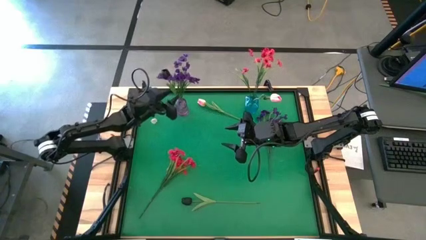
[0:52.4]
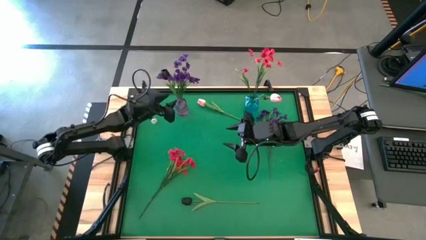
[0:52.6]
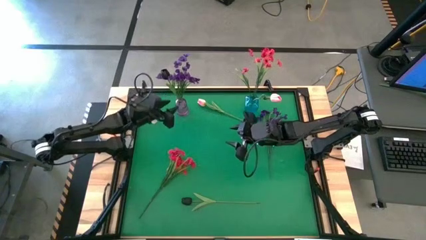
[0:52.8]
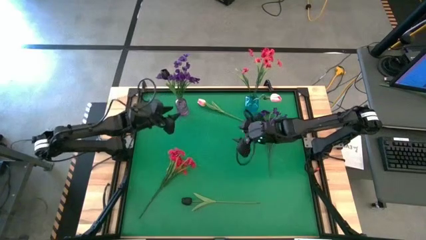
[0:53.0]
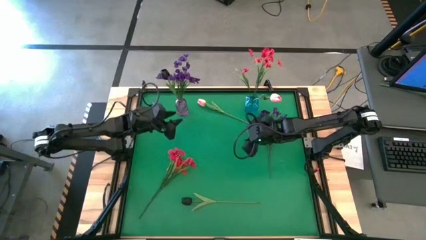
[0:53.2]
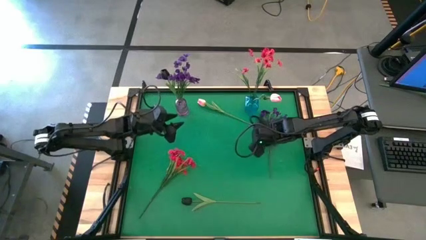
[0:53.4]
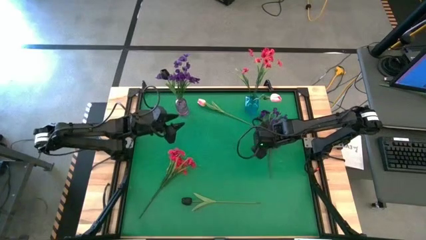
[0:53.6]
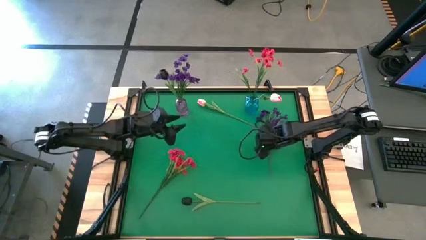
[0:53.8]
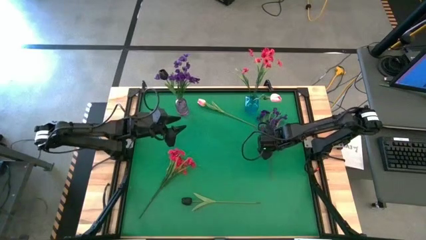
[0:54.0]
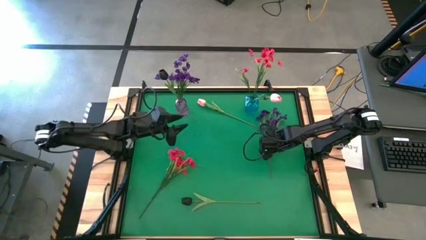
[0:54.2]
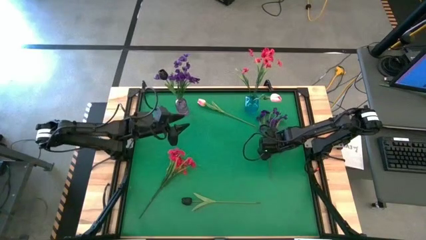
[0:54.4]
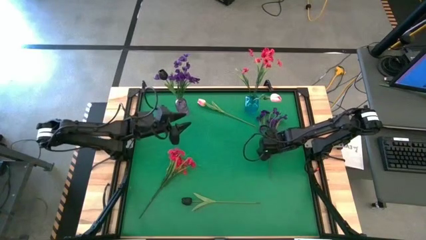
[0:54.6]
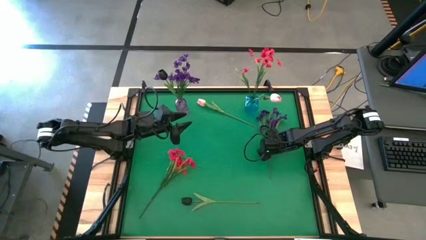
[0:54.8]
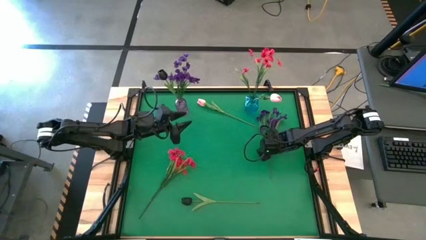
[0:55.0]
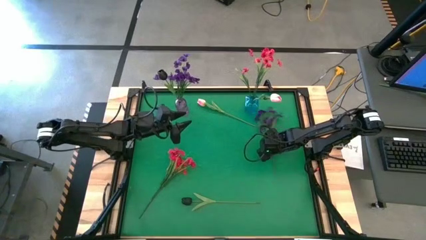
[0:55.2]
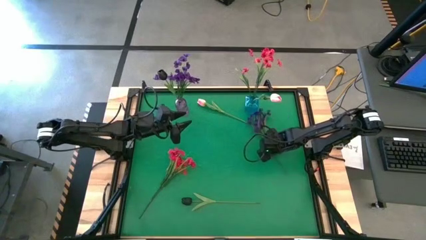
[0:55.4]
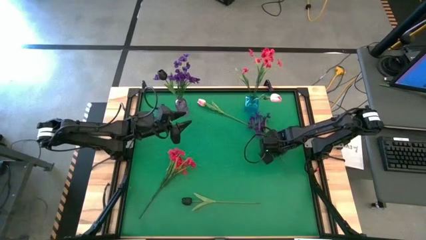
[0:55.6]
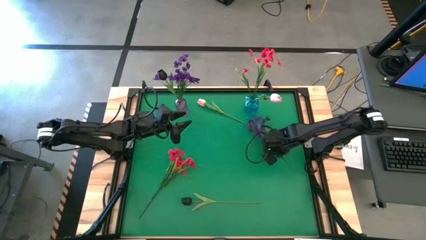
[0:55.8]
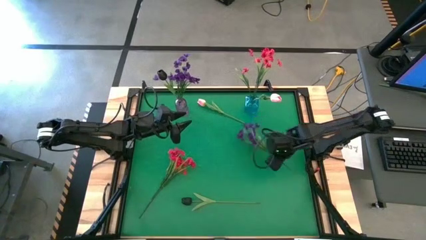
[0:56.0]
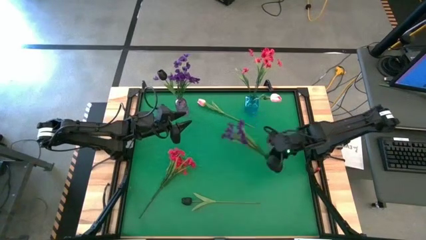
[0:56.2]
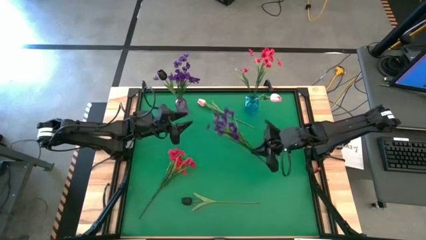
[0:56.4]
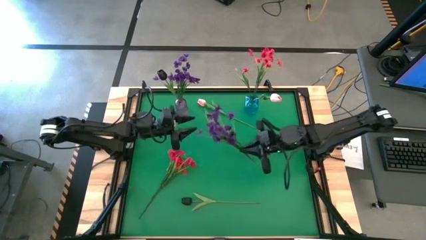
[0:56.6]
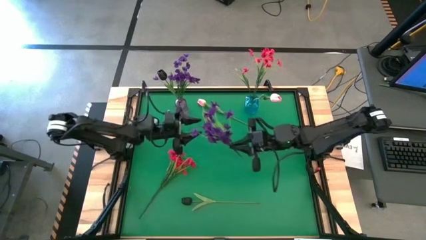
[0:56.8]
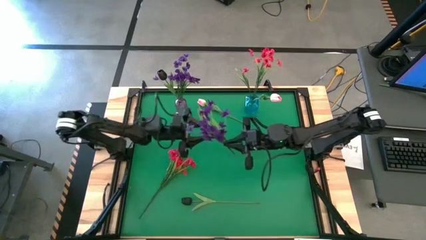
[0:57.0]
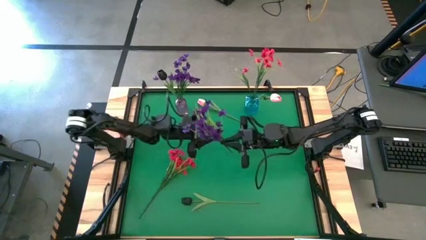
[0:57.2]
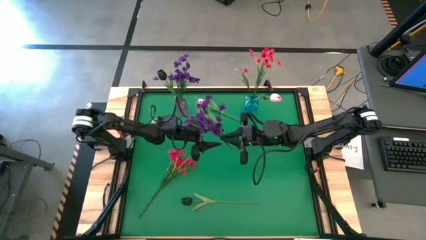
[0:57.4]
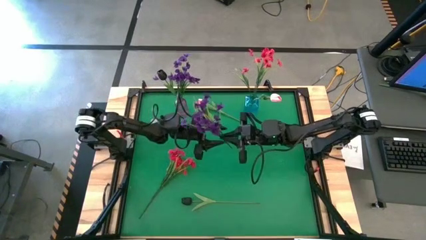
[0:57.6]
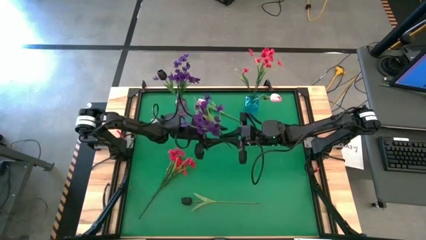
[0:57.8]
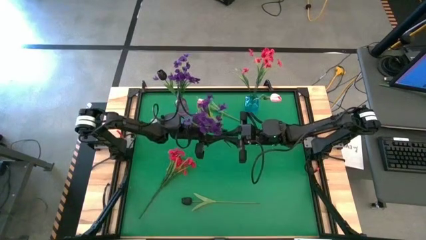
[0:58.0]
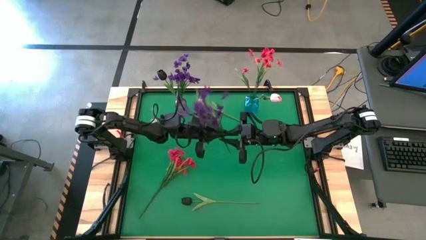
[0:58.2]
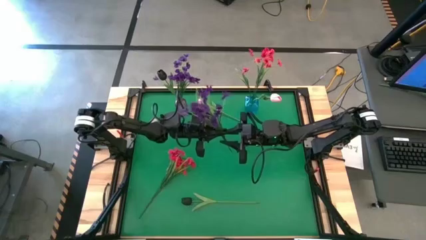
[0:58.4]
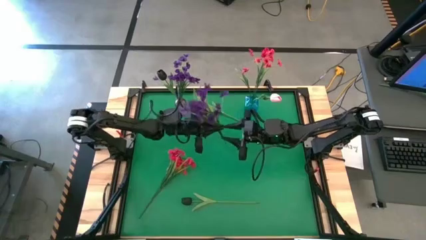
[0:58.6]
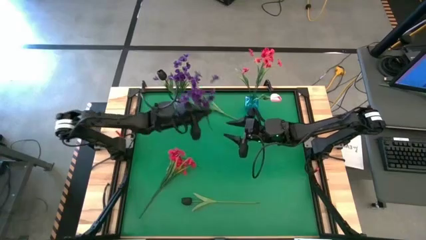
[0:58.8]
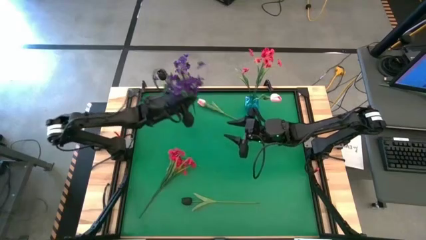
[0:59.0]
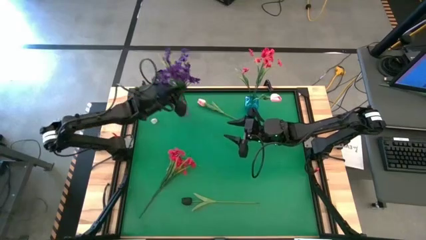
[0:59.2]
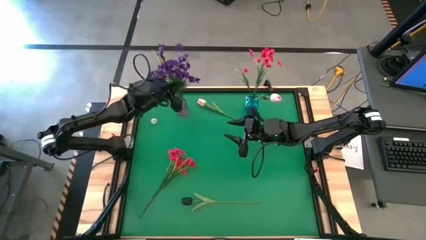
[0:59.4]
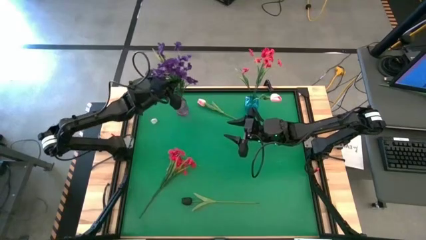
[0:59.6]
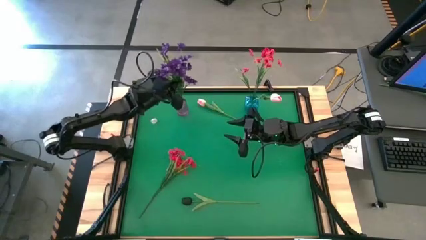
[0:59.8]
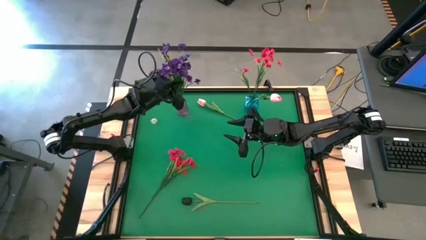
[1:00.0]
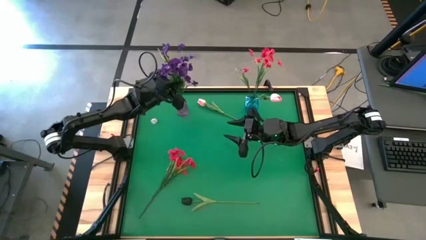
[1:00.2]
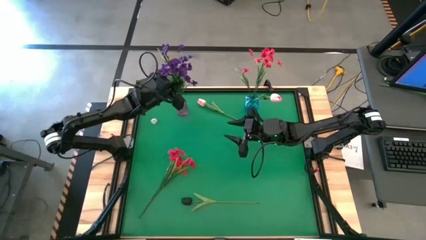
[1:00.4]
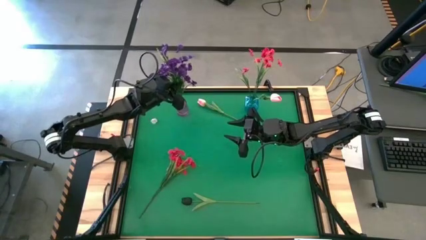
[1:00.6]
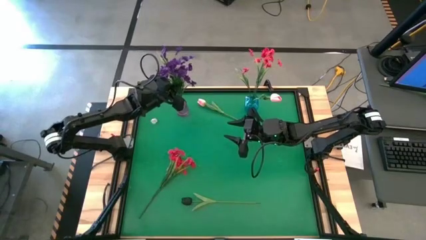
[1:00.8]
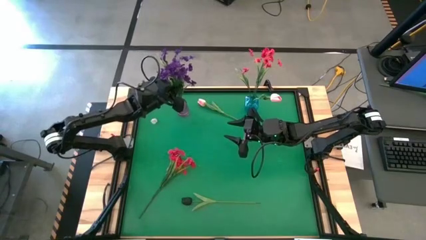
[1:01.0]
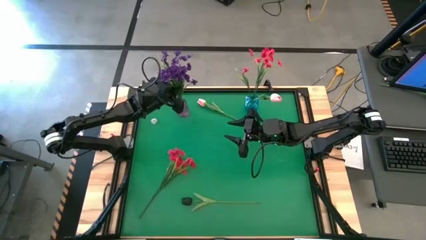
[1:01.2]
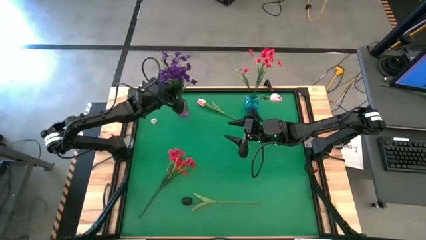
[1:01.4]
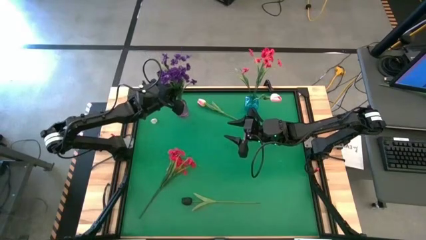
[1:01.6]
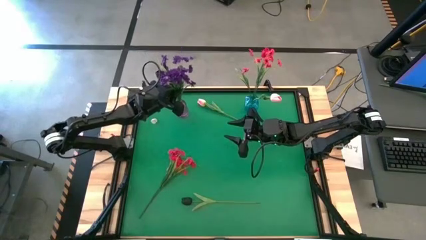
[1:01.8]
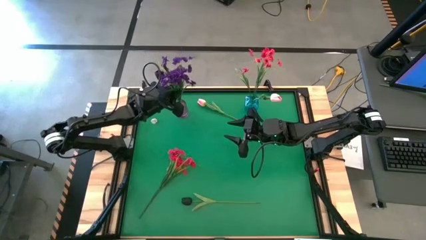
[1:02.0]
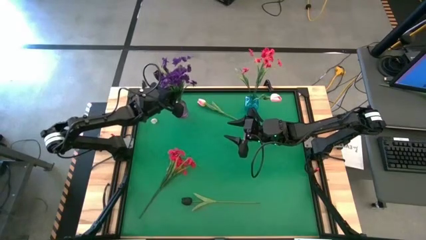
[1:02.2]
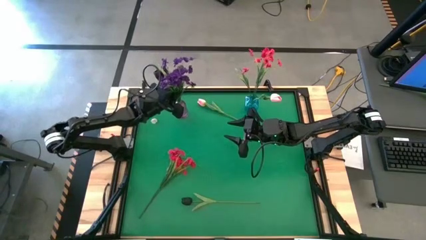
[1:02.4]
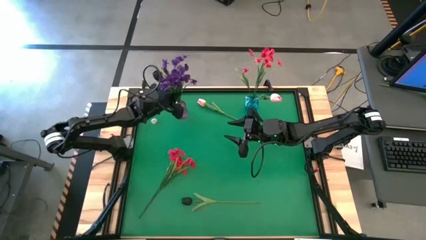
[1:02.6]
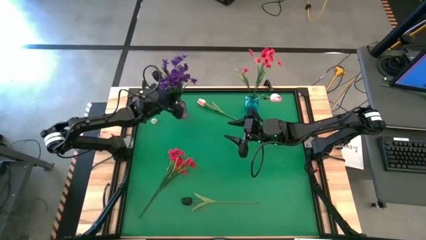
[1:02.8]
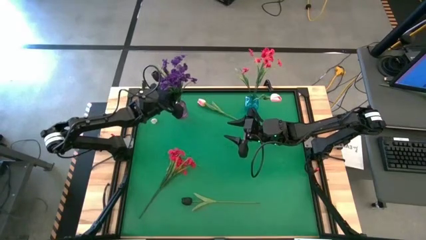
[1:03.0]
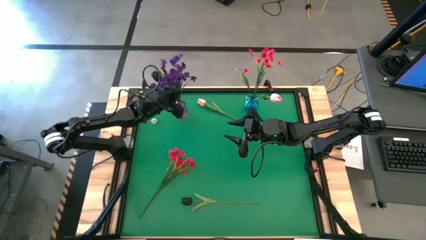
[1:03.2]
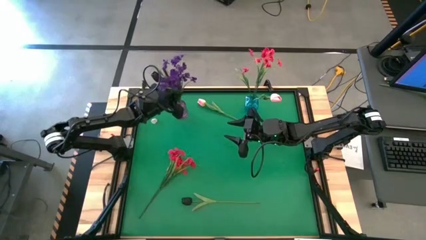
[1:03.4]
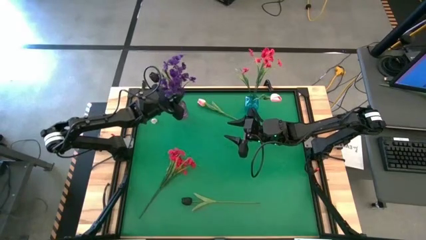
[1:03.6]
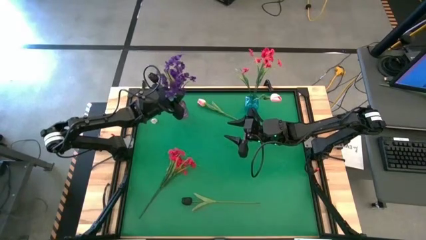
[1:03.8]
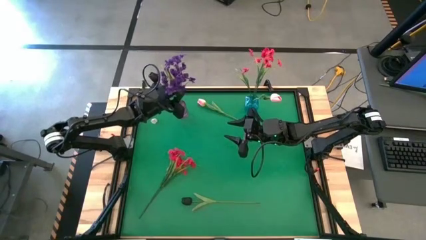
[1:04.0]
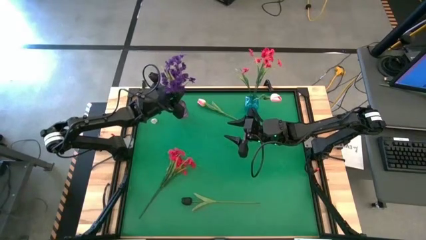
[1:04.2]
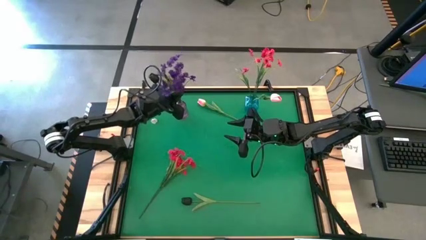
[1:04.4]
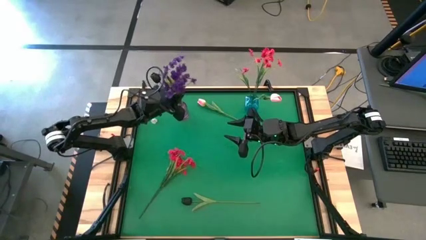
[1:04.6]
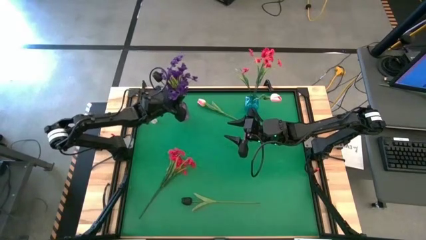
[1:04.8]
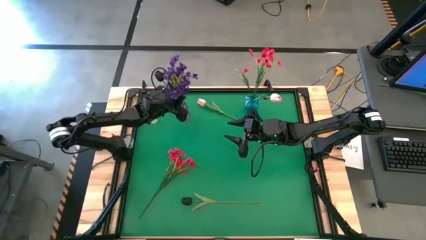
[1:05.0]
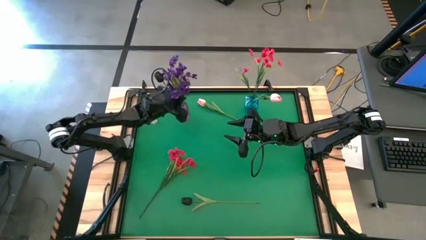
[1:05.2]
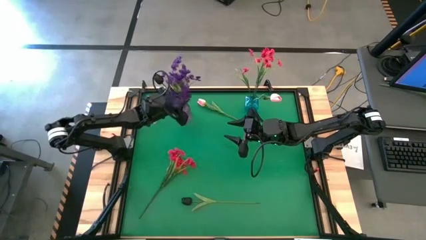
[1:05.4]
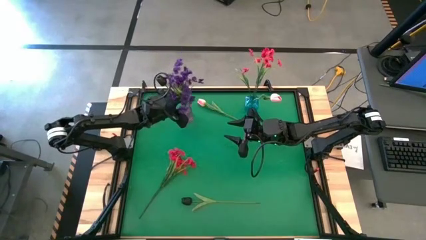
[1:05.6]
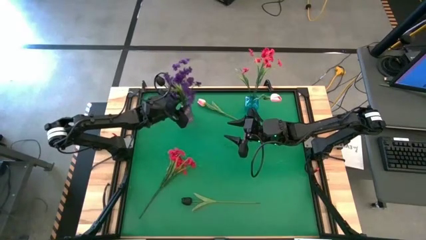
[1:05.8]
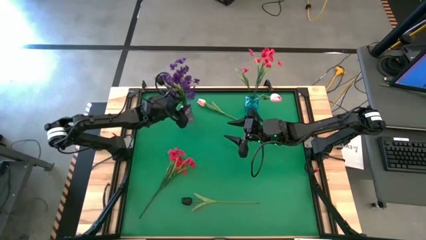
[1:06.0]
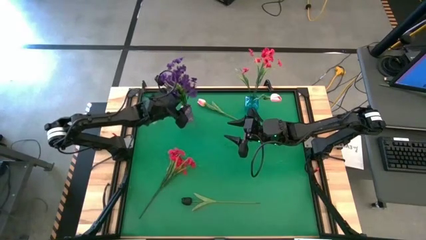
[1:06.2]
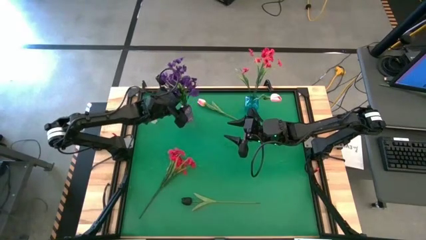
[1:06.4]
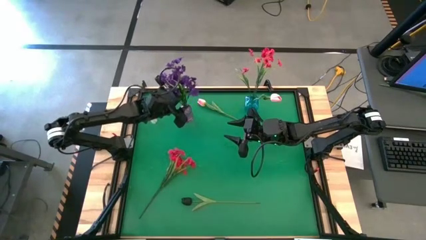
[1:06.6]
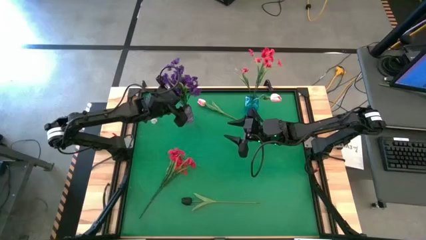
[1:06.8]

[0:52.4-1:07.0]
Task: Sort flowers into vase by color
Put the violet flowers into the violet vase

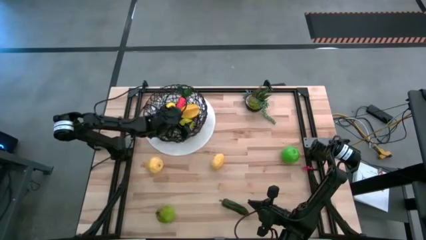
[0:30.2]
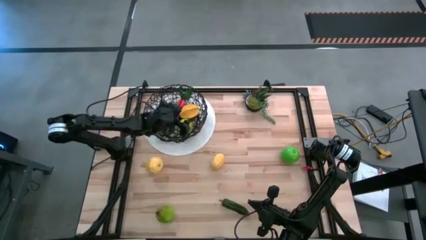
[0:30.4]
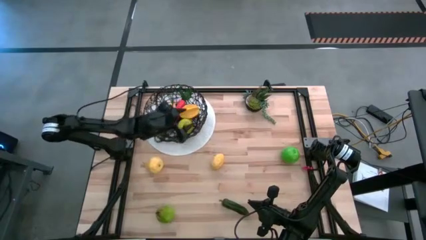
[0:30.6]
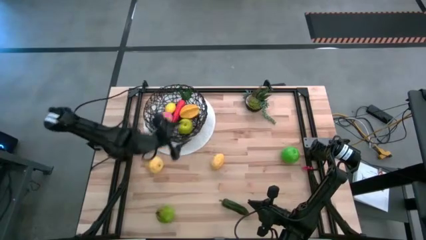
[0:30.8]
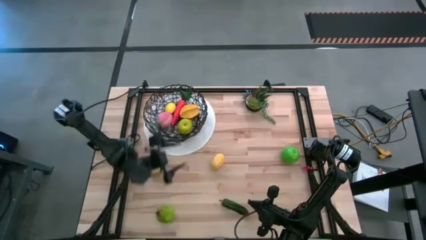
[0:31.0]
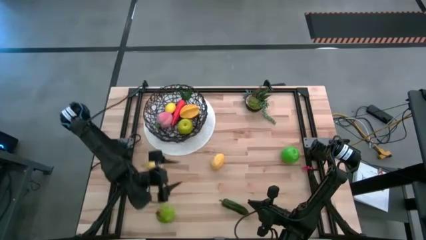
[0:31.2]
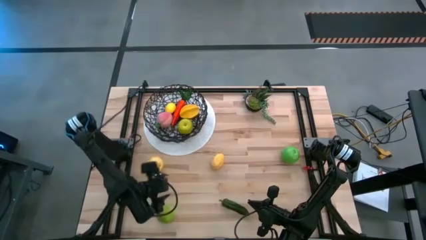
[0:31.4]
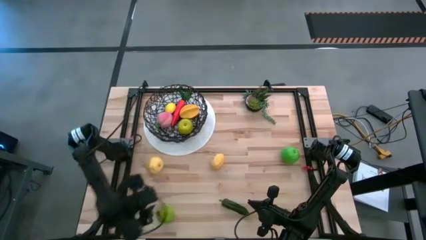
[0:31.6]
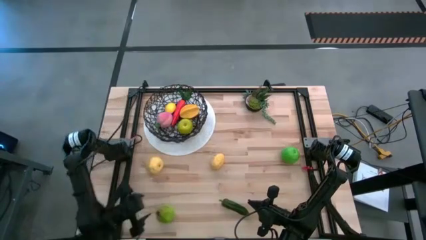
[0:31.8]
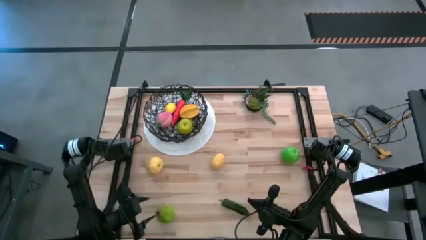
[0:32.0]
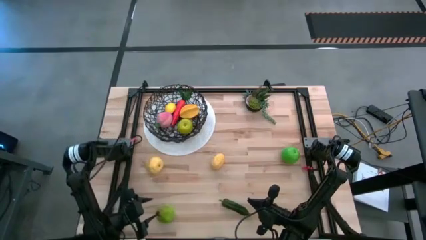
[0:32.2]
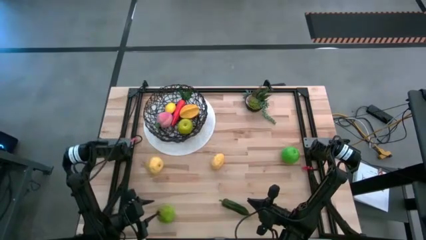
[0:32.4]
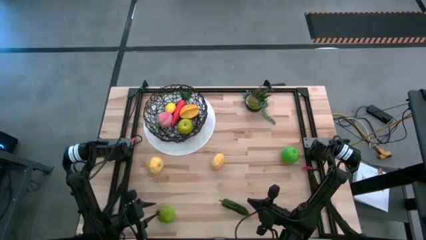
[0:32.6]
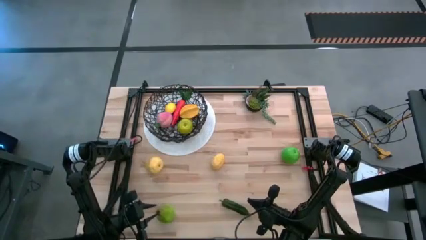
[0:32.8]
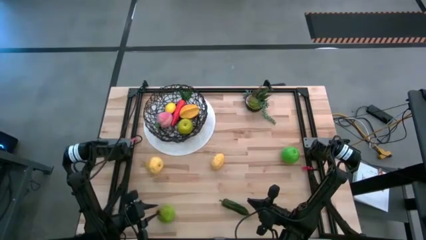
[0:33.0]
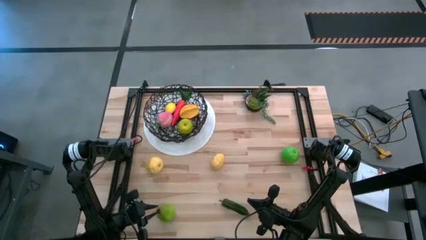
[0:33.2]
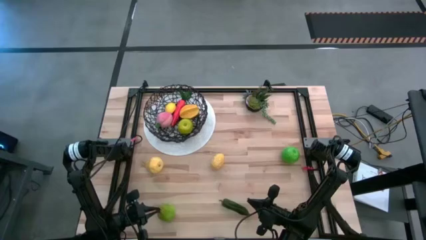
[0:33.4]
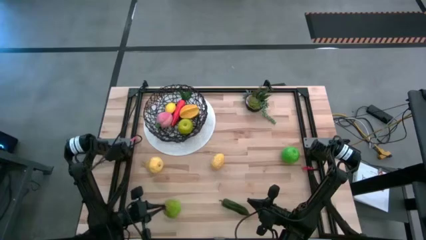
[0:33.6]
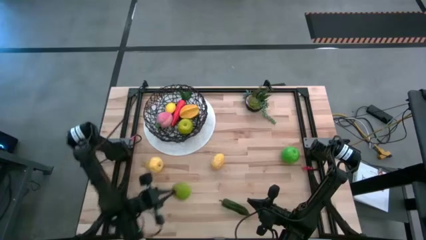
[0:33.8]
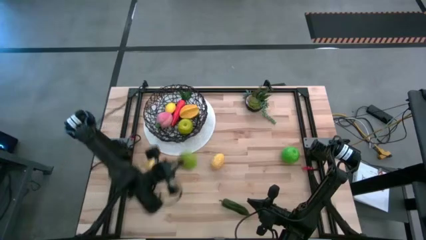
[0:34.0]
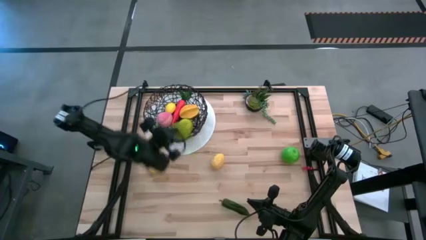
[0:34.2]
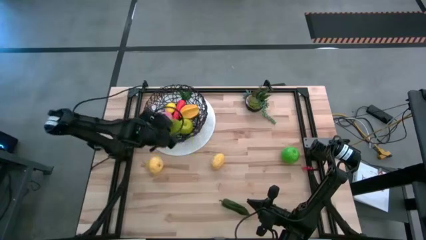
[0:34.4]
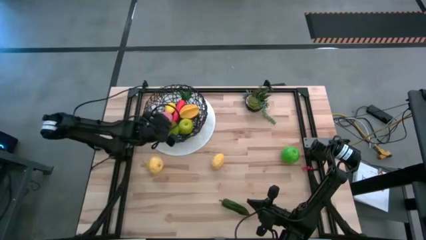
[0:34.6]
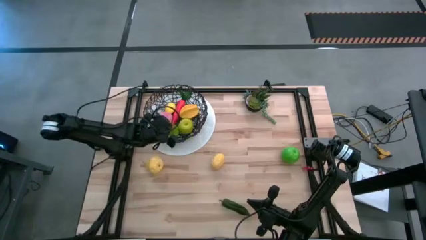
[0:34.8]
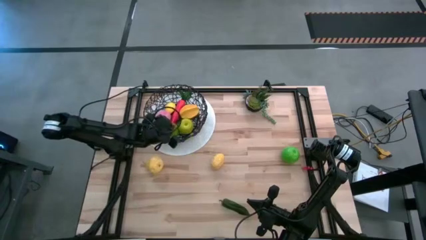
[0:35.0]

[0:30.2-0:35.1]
Task: Build produce basket
Put the green pear into the wire basket
